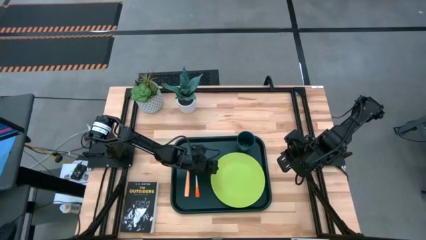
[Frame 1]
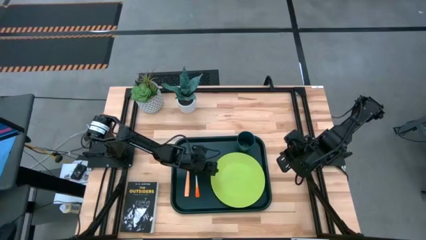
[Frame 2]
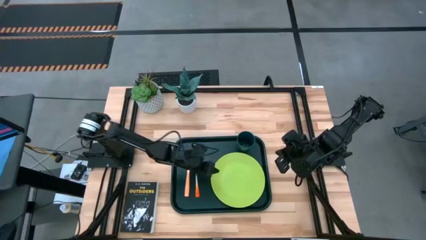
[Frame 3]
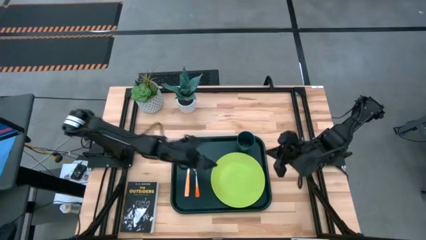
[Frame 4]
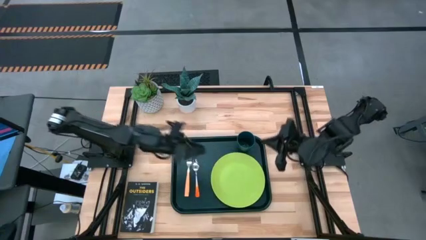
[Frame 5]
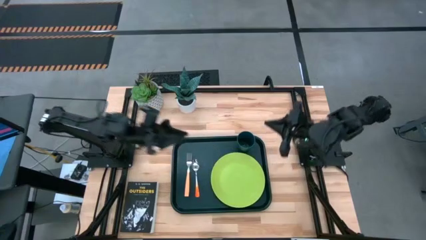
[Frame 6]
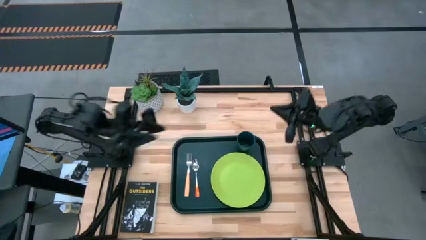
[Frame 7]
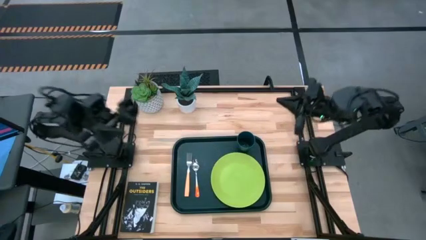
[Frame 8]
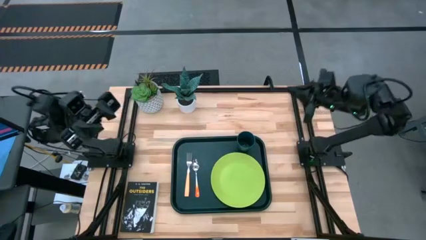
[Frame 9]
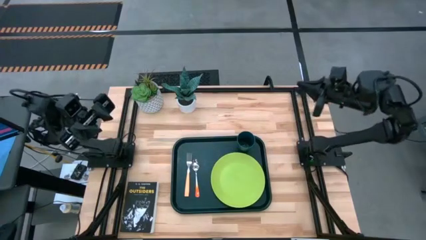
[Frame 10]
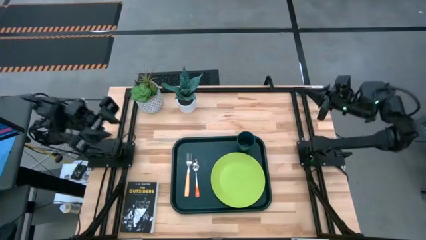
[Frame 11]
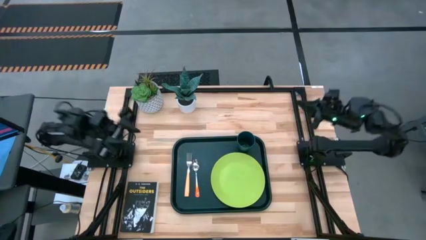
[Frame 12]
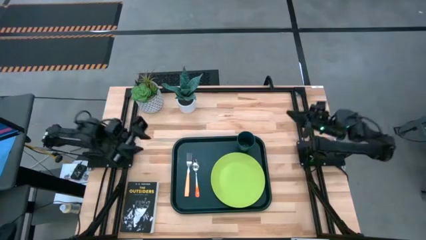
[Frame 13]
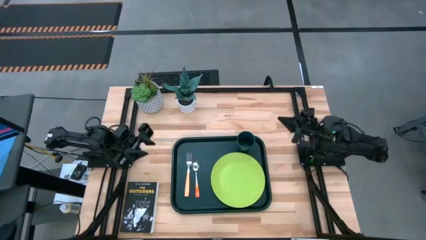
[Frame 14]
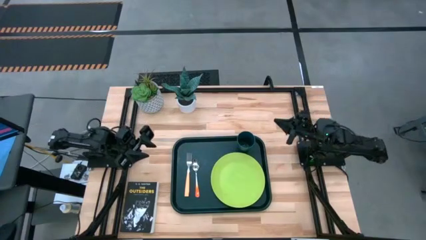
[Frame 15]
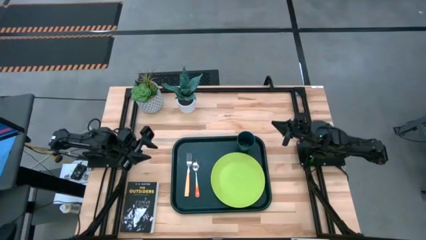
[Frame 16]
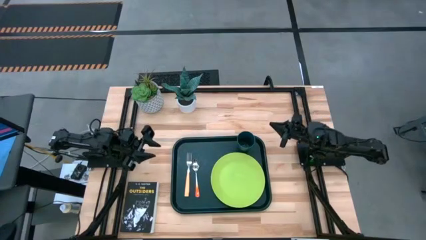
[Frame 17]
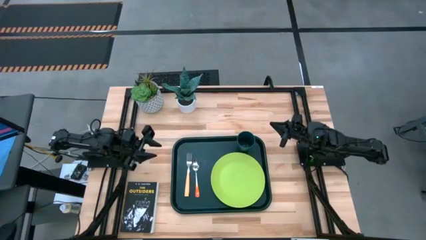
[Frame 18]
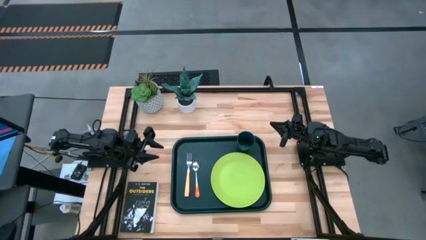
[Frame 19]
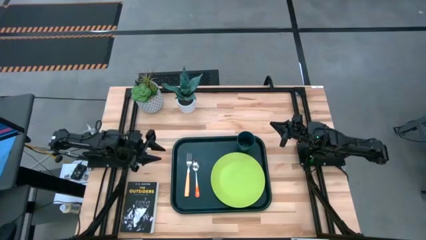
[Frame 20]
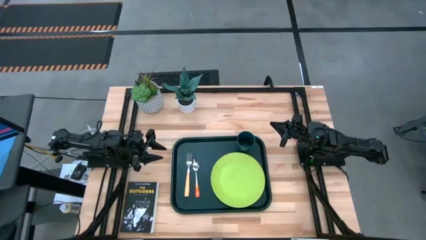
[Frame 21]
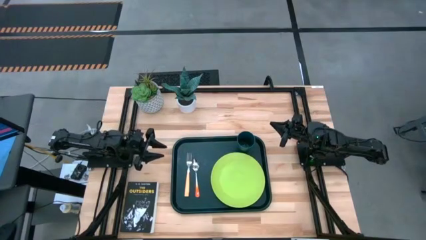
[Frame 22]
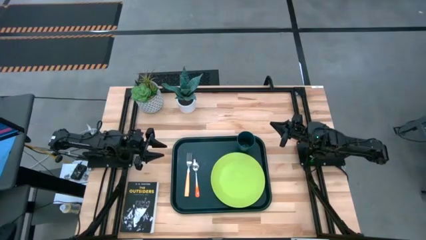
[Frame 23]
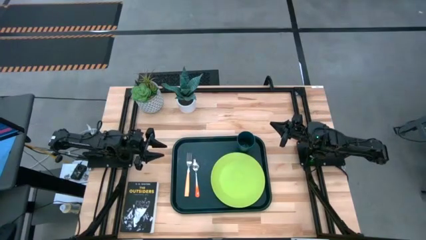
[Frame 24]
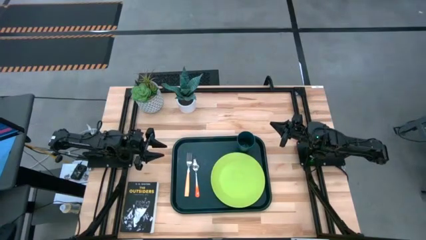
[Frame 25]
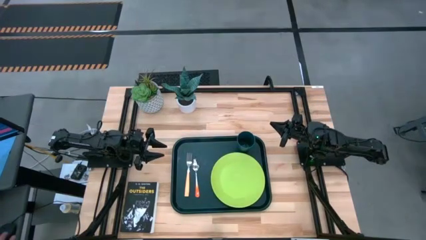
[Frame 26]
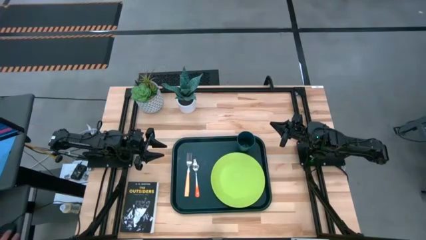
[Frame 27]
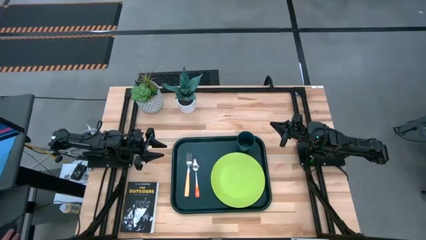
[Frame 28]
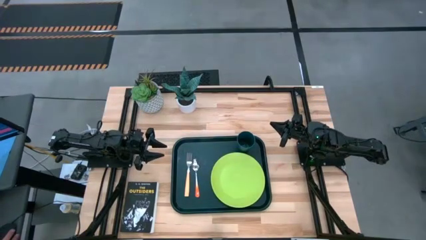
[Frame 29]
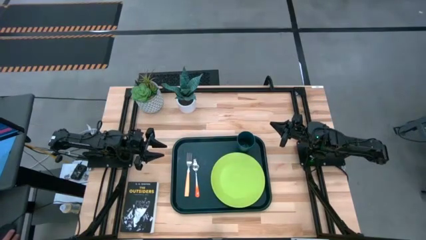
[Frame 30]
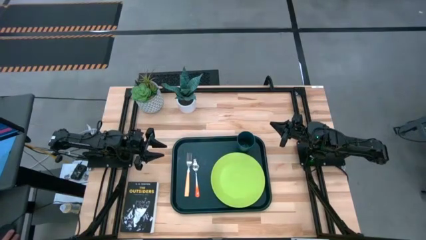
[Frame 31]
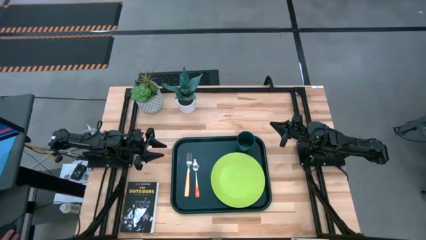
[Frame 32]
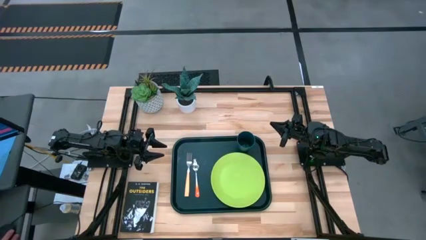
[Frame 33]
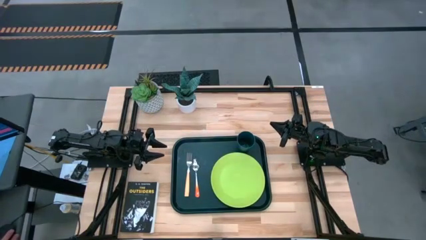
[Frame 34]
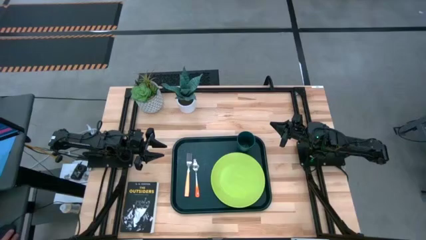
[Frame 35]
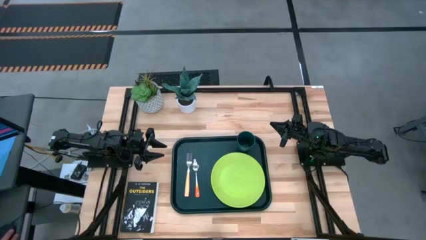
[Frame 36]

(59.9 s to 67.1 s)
Task: Pick and place plate/cup/fork/spoon on tray
Return to Home Position

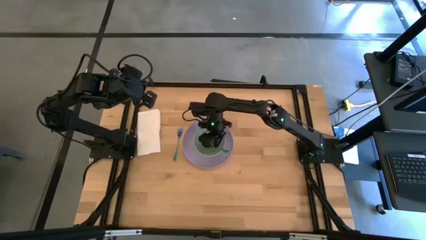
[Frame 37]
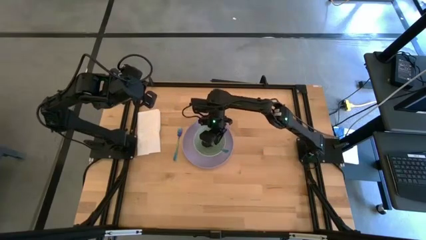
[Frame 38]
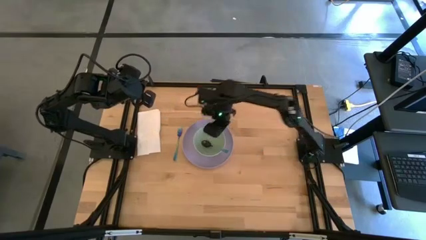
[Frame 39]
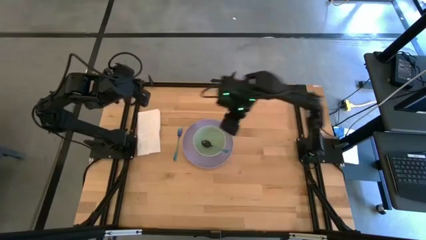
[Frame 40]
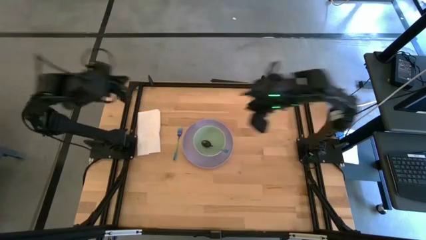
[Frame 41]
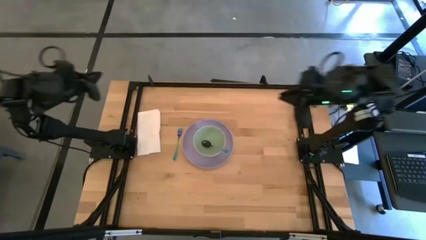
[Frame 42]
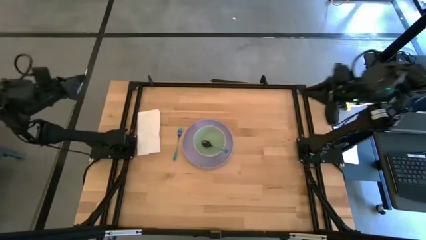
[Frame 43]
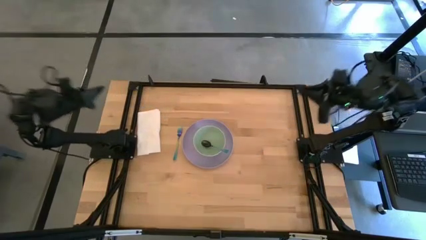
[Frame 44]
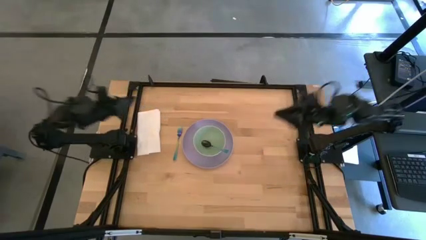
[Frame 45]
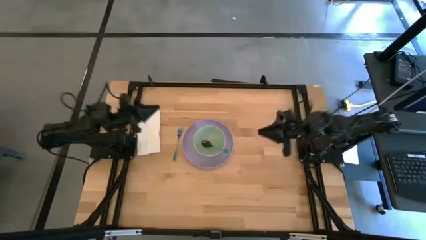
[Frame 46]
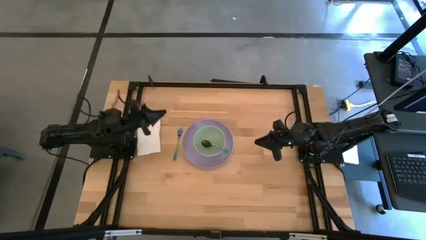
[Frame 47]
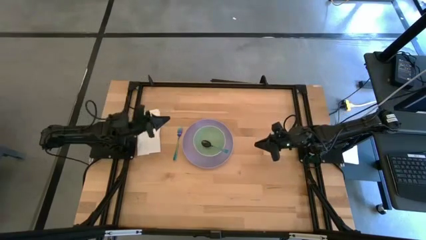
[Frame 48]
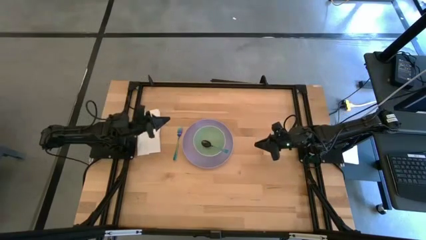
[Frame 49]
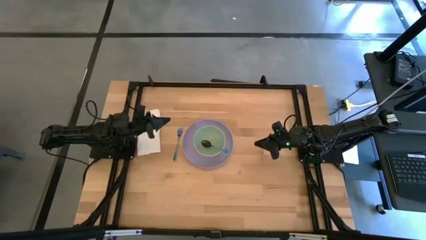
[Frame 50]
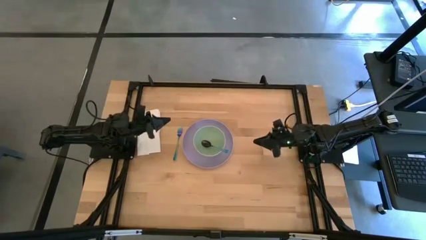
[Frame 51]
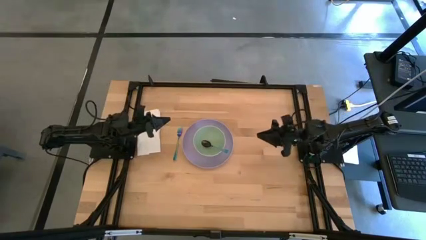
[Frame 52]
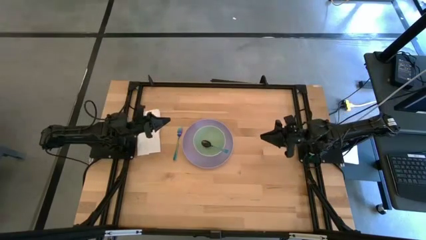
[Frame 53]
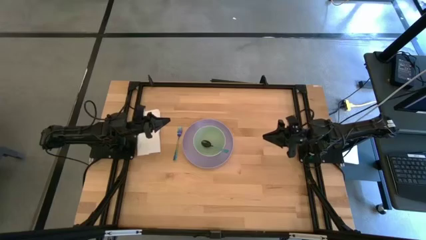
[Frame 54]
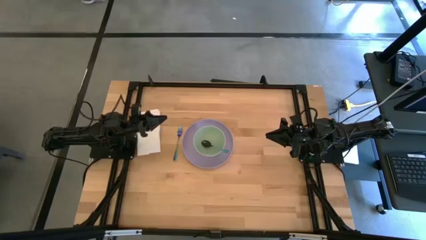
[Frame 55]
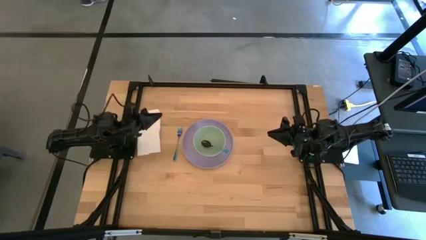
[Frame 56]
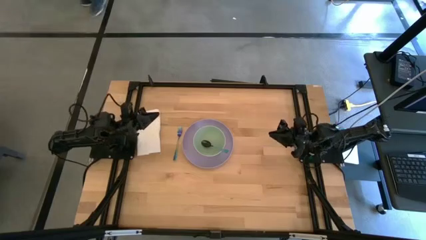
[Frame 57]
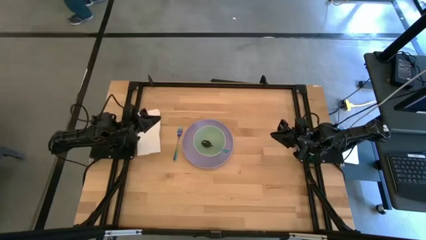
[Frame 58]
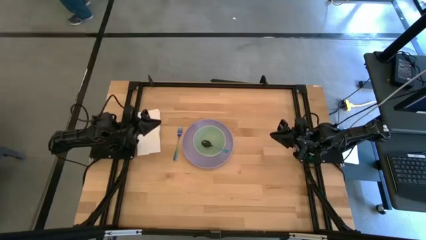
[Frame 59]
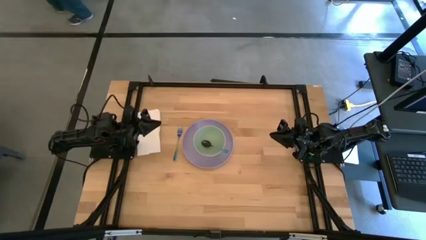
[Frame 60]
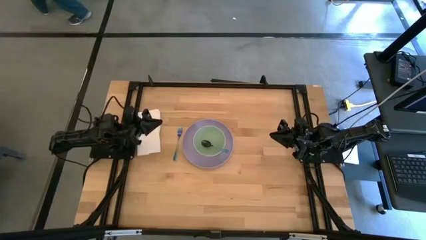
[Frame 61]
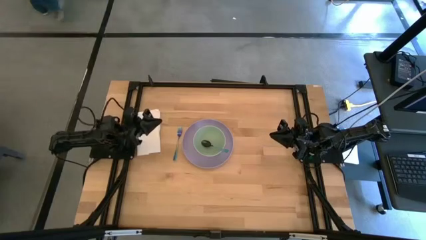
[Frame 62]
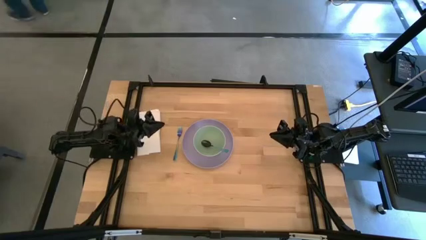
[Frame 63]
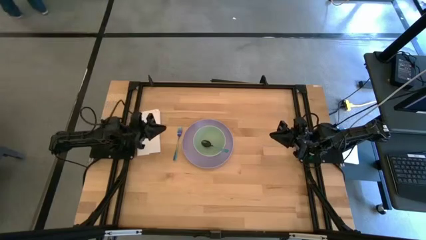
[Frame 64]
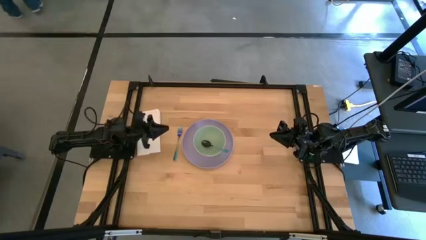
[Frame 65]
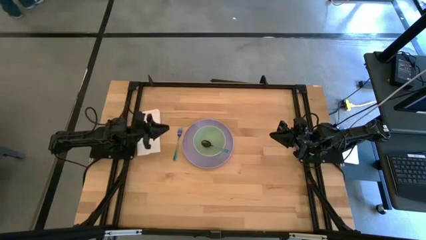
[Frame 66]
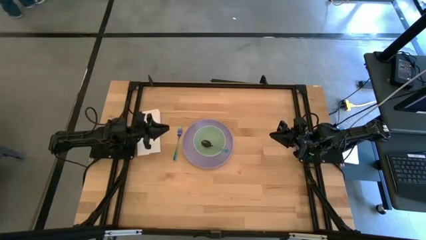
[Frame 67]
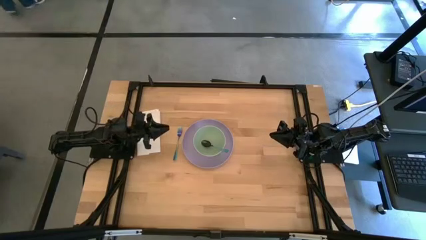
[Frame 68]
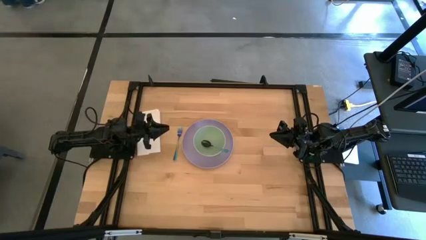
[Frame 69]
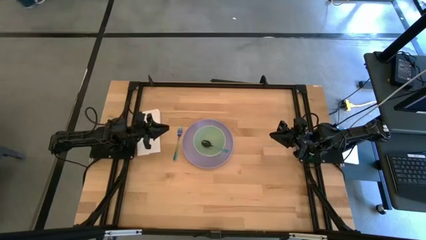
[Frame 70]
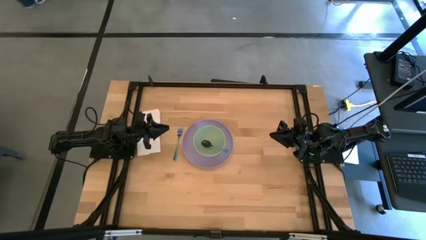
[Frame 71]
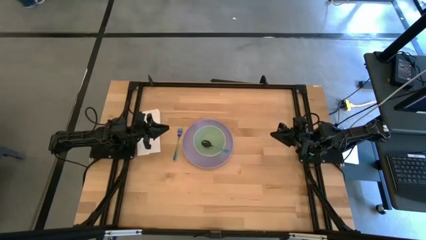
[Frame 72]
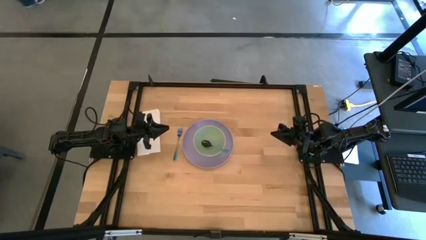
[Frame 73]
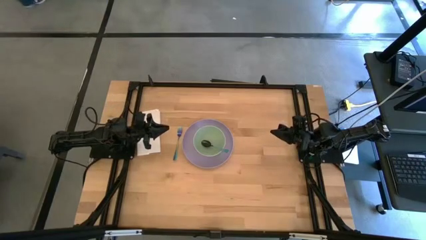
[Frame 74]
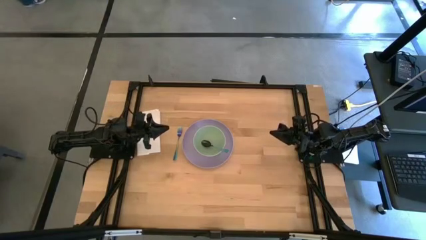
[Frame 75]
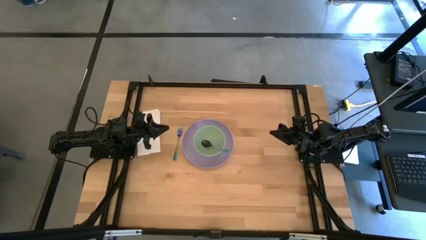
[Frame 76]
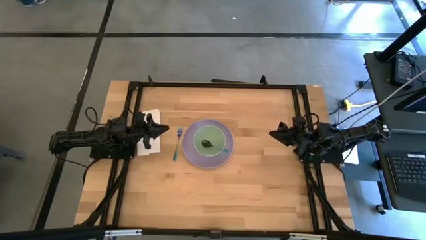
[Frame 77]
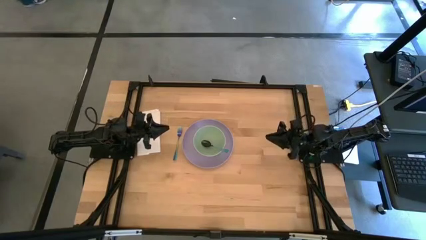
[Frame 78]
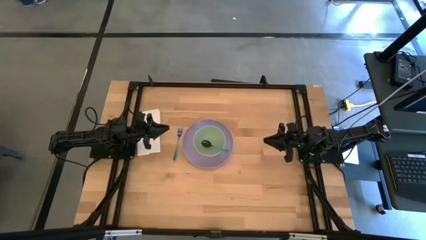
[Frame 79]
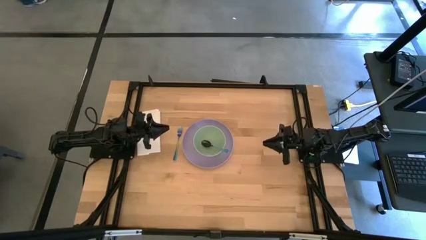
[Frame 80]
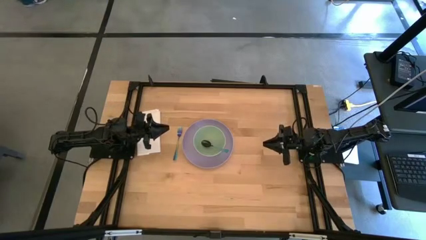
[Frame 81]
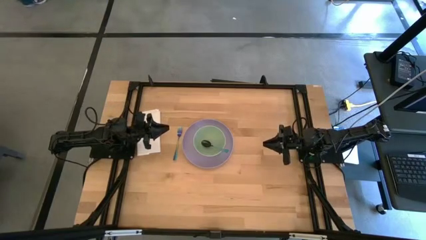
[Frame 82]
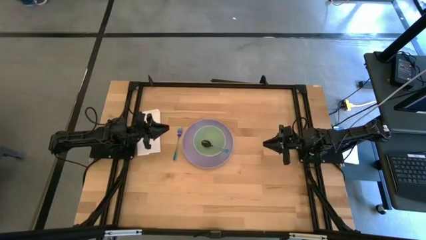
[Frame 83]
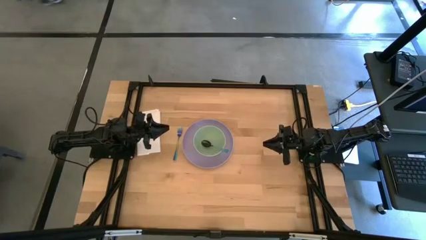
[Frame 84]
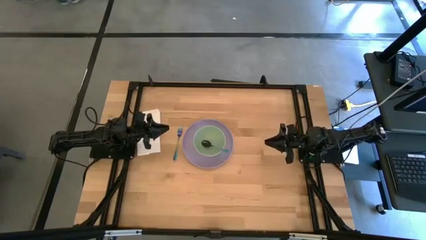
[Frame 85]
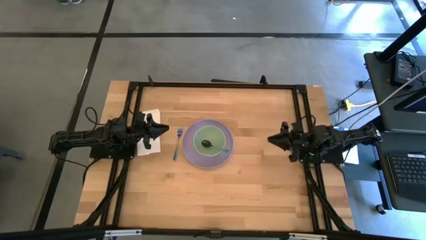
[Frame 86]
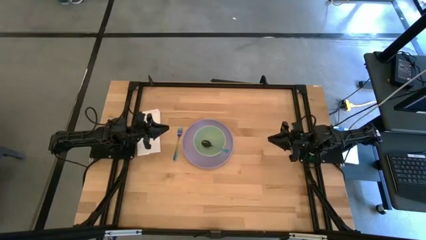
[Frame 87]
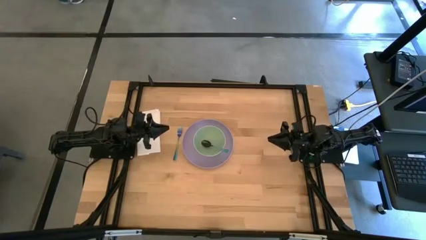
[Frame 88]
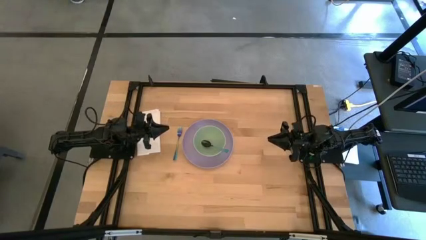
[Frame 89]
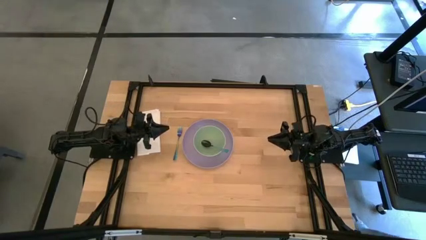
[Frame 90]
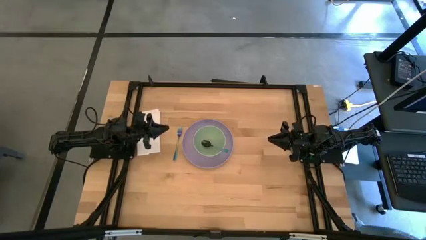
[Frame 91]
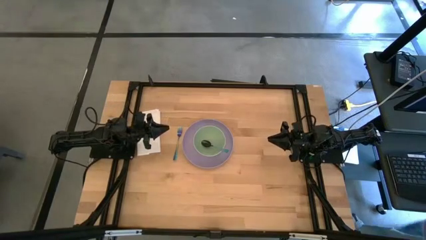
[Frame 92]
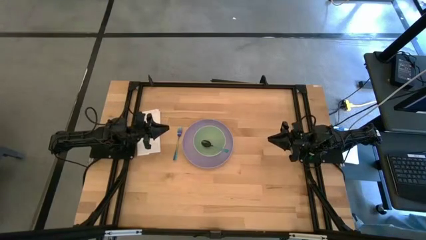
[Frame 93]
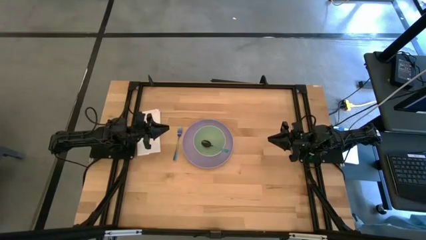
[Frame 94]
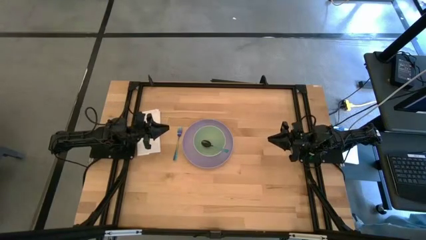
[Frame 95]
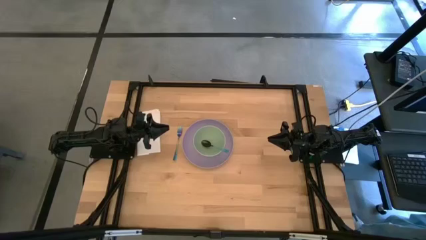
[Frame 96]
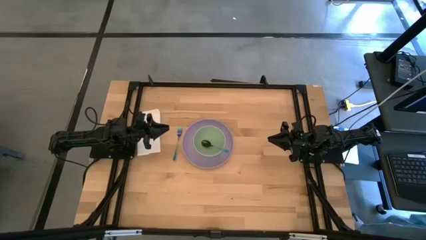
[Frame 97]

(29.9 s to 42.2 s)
Task: Set table place
Return to Home Position
